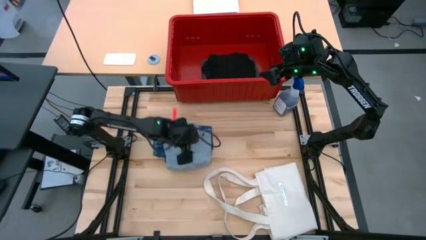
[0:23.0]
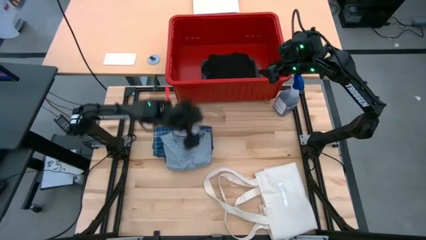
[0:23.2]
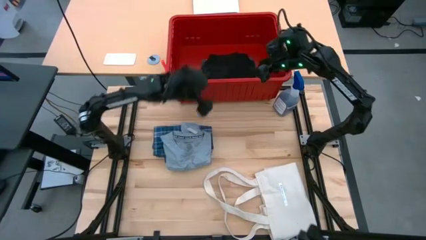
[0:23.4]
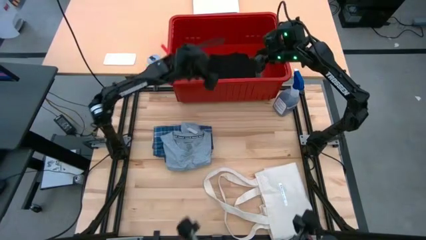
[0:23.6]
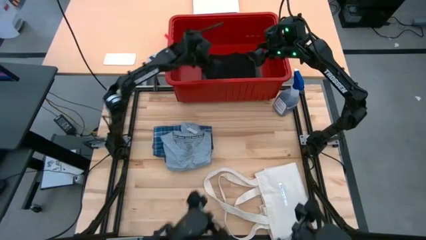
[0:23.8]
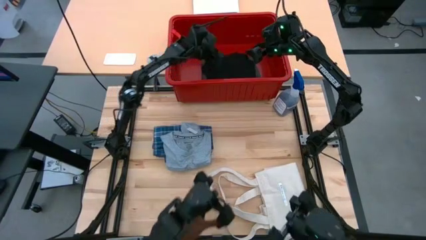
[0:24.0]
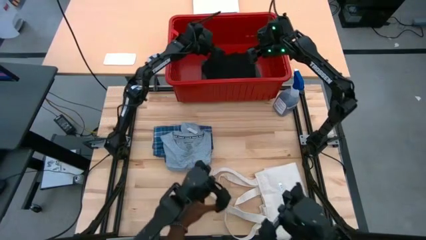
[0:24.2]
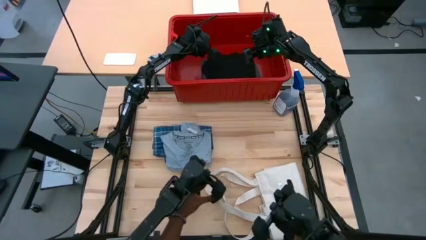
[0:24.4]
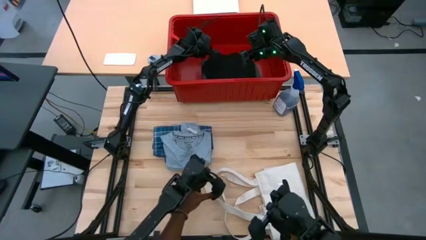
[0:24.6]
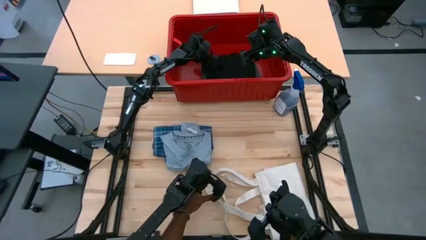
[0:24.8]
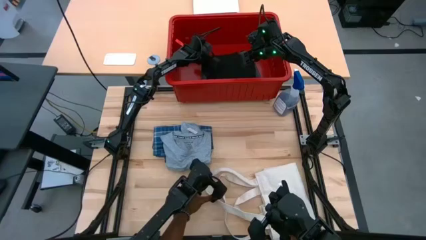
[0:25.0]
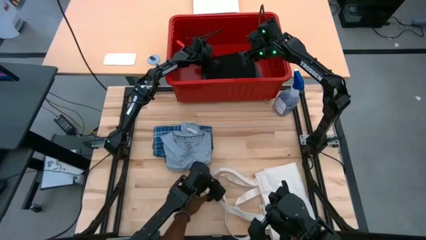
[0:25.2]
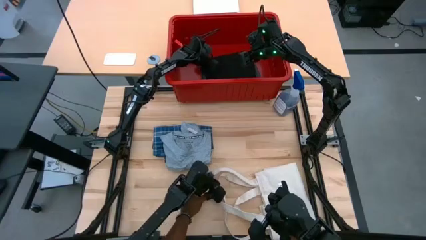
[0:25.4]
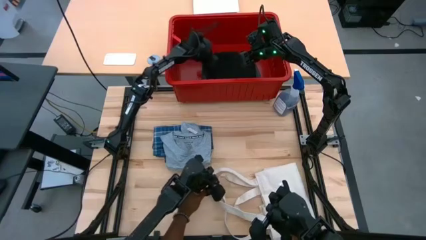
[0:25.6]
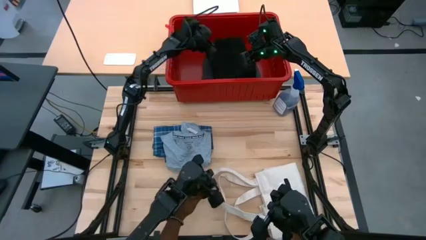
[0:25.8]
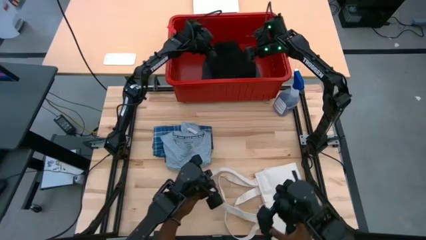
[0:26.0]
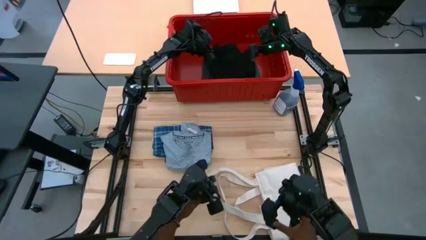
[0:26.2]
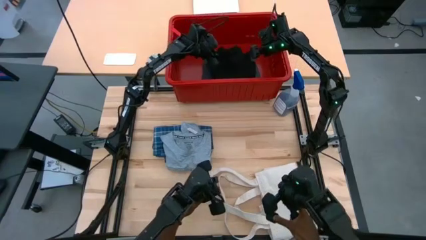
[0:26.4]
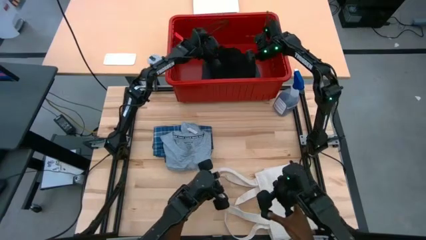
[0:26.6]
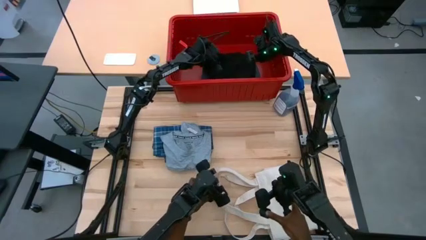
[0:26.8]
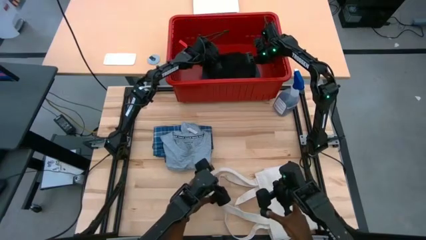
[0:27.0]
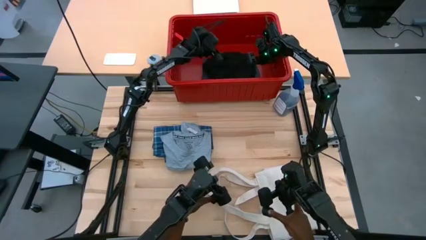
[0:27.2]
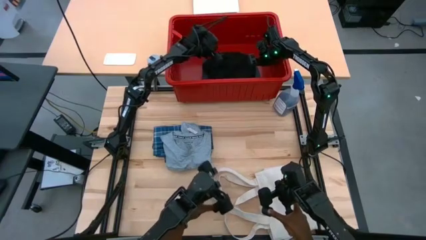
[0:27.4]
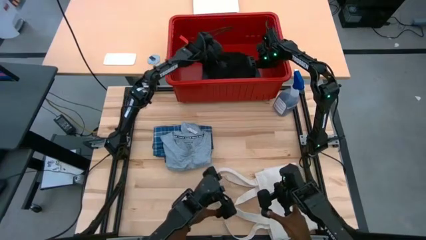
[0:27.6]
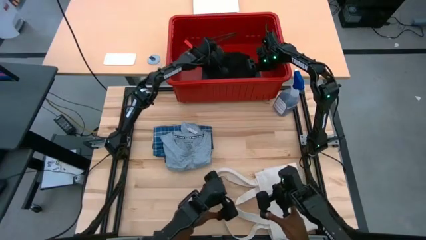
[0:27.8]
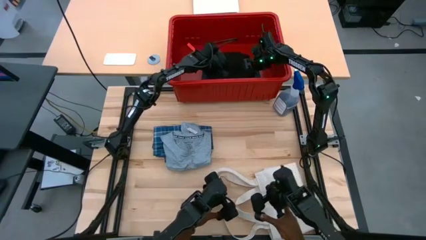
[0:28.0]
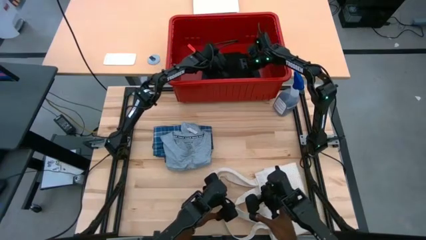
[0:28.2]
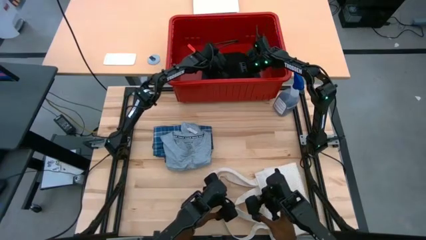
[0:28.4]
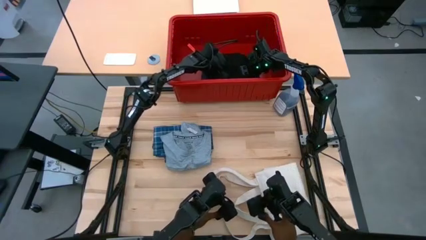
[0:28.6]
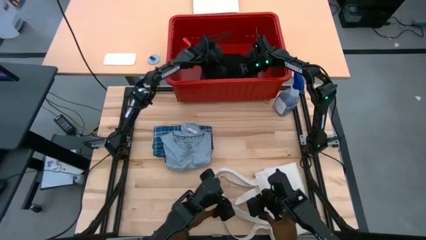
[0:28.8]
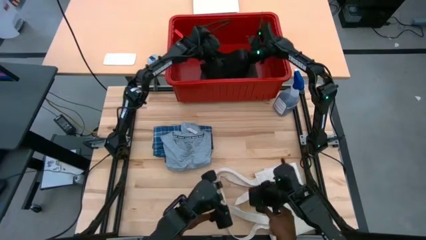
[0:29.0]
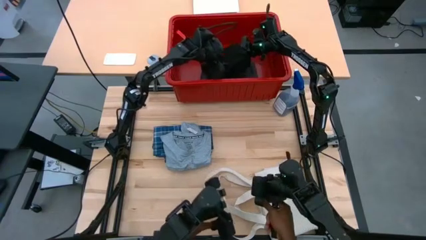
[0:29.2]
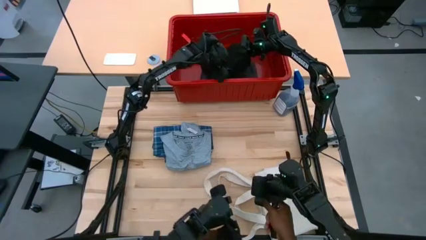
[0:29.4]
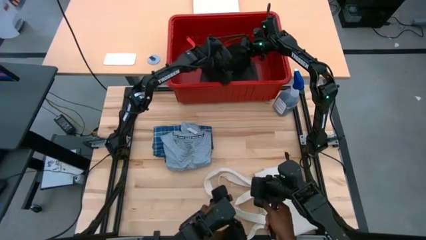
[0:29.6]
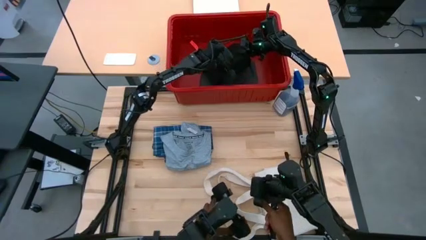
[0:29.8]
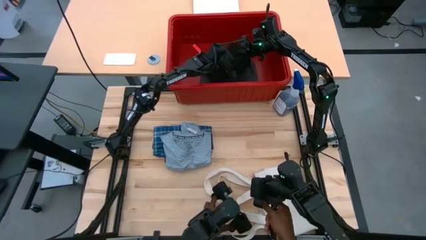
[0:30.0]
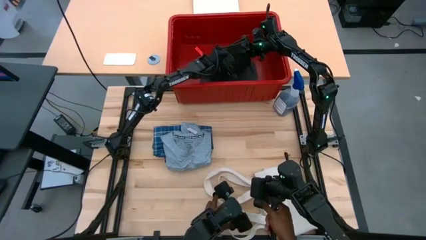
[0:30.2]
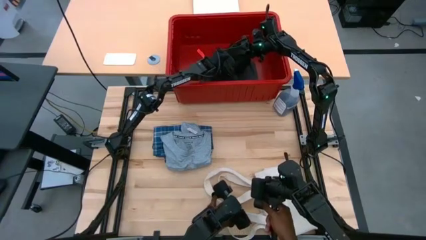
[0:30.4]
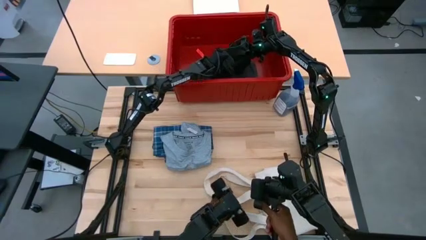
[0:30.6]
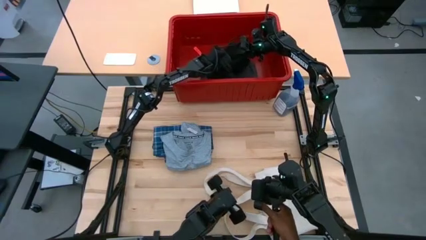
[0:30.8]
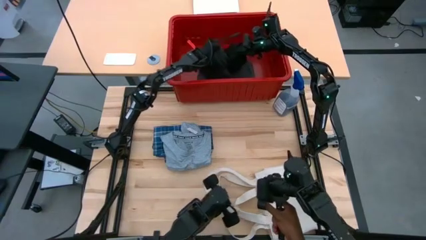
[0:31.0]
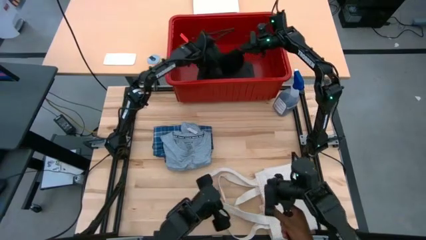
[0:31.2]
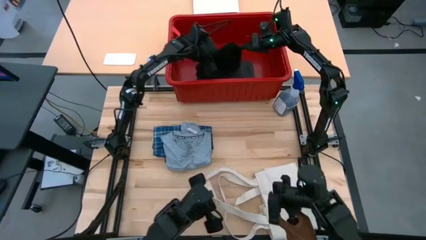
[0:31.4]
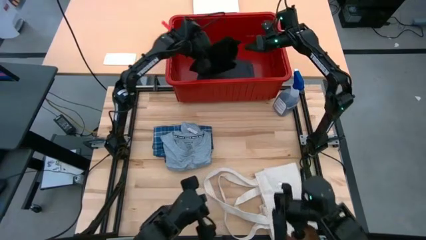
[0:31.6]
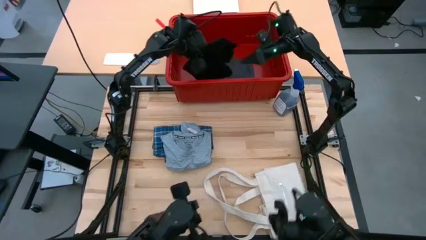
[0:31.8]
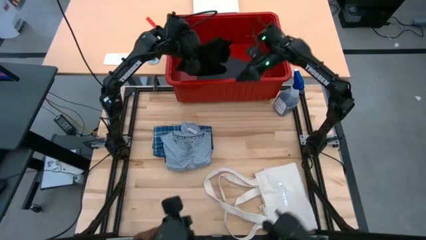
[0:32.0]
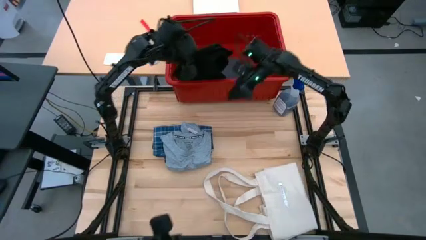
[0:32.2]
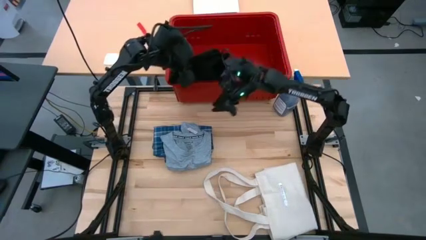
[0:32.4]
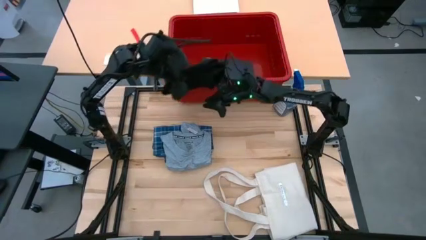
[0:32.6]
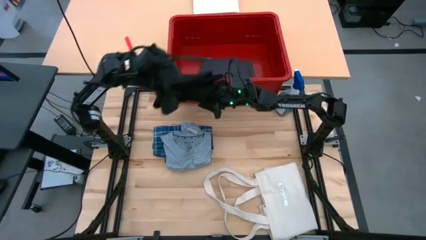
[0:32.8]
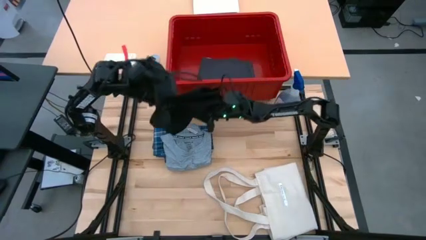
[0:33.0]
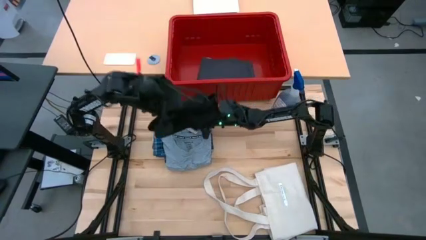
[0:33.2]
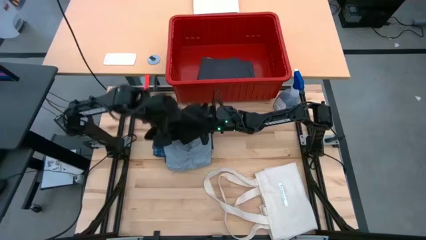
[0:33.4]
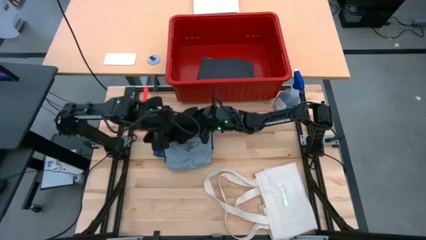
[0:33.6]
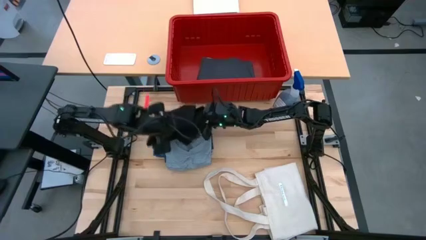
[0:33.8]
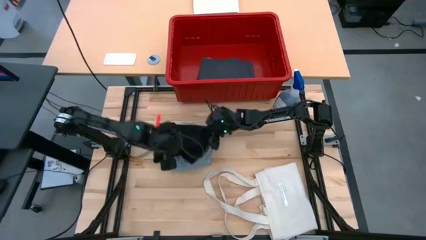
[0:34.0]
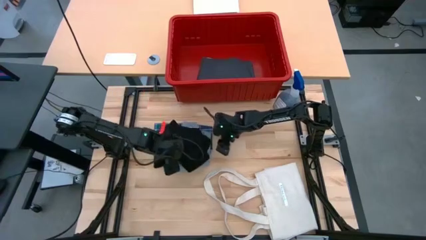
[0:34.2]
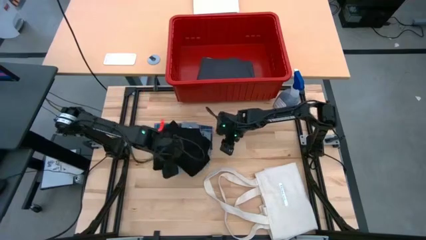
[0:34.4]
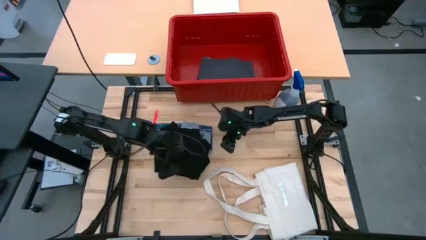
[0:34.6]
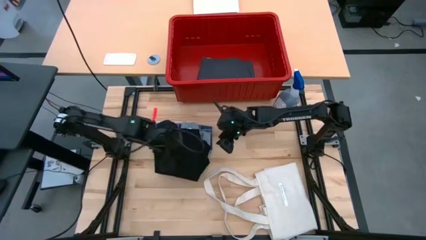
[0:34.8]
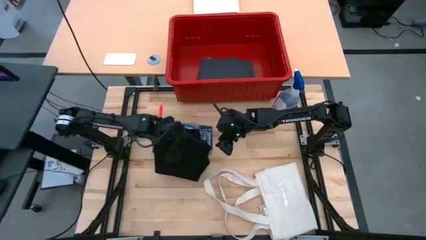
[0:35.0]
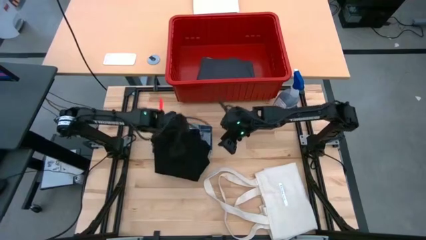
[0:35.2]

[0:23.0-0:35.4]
Task: Fold laundry
Remove the black shirt from the red organizer bin

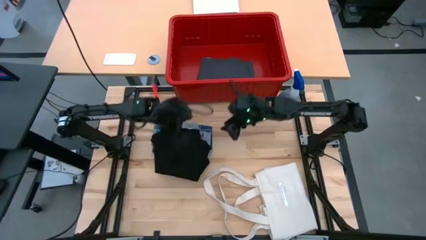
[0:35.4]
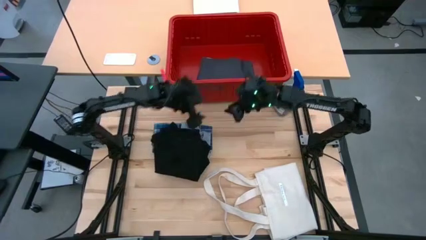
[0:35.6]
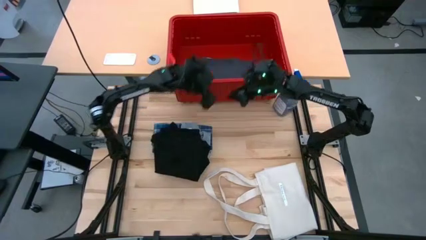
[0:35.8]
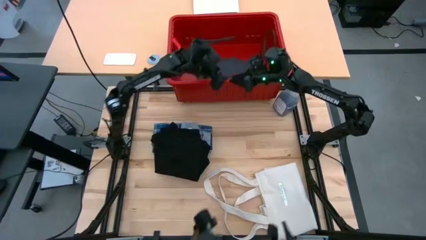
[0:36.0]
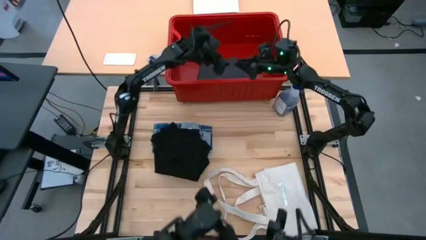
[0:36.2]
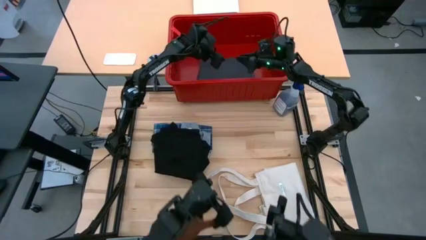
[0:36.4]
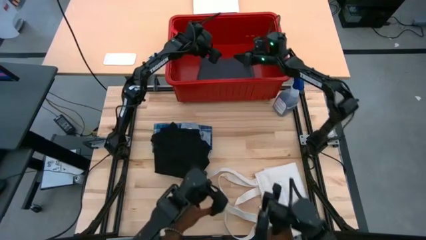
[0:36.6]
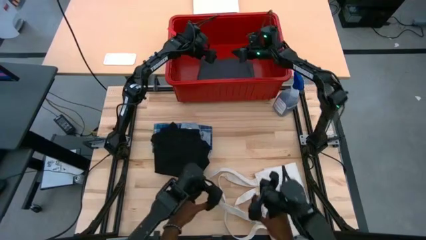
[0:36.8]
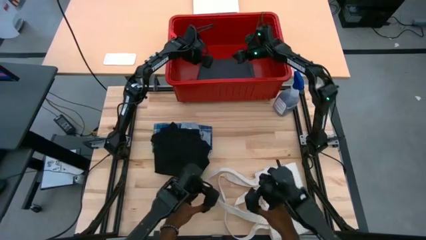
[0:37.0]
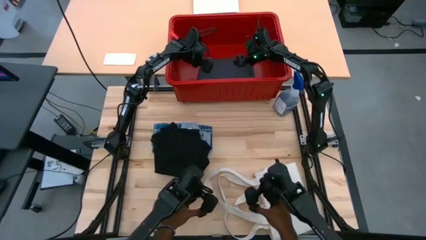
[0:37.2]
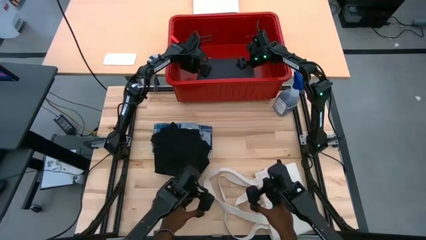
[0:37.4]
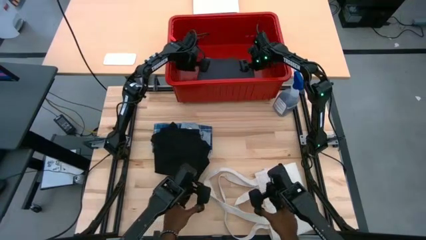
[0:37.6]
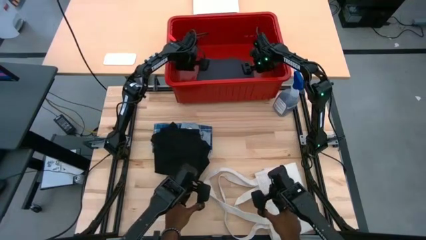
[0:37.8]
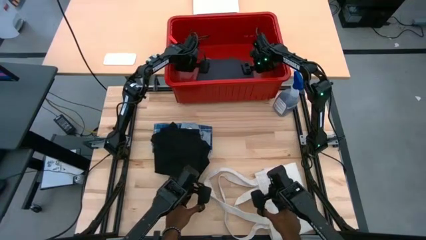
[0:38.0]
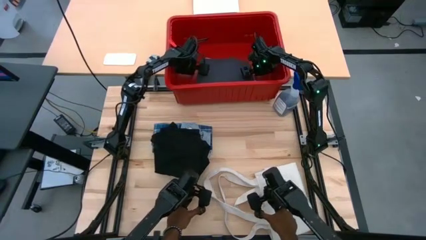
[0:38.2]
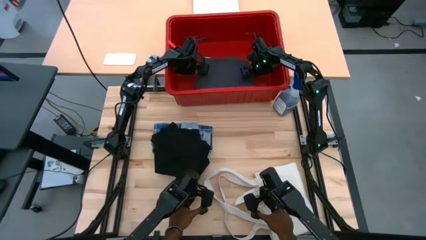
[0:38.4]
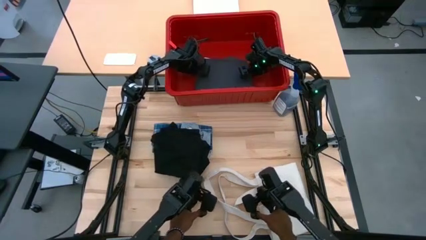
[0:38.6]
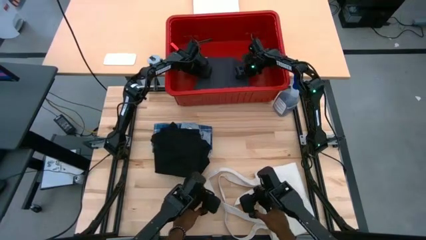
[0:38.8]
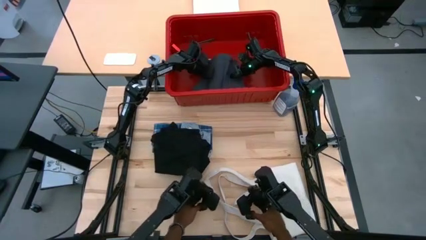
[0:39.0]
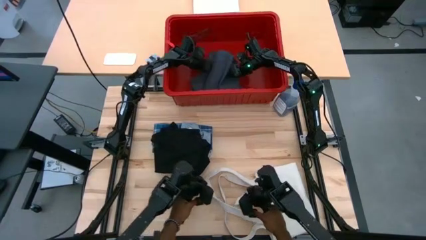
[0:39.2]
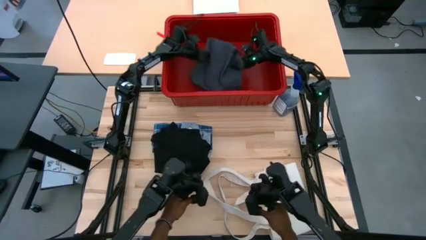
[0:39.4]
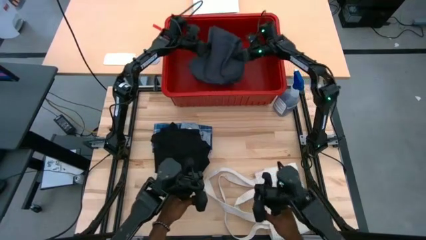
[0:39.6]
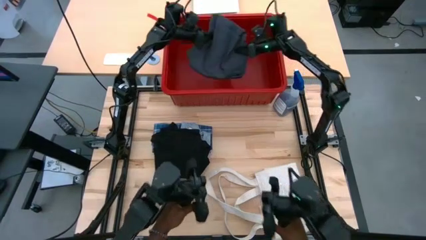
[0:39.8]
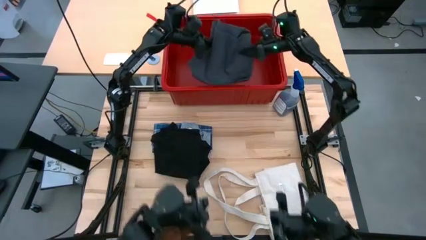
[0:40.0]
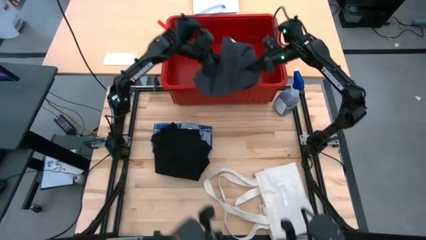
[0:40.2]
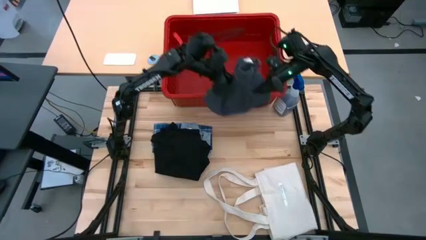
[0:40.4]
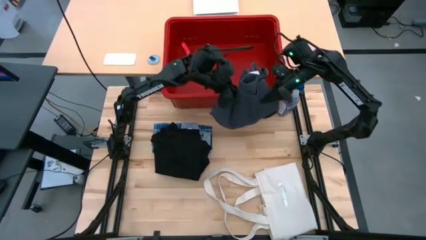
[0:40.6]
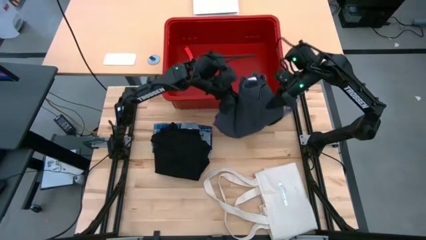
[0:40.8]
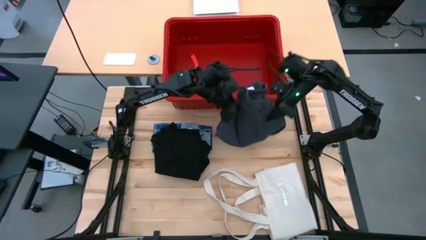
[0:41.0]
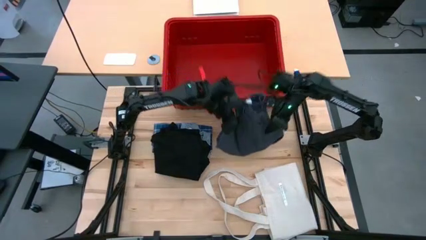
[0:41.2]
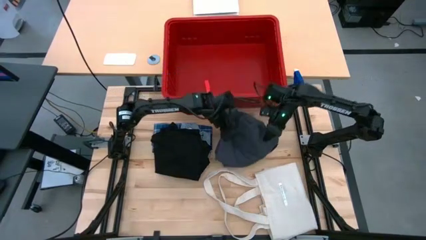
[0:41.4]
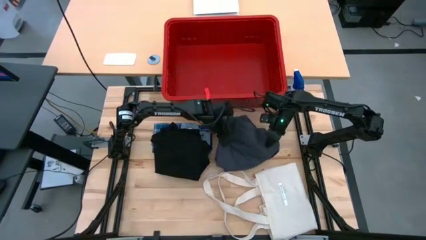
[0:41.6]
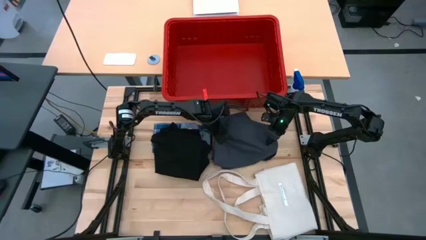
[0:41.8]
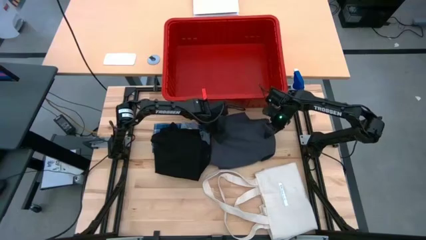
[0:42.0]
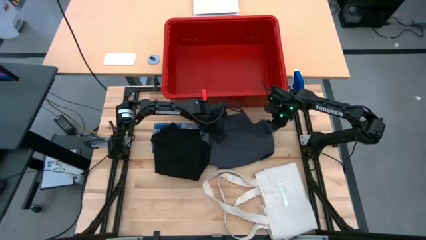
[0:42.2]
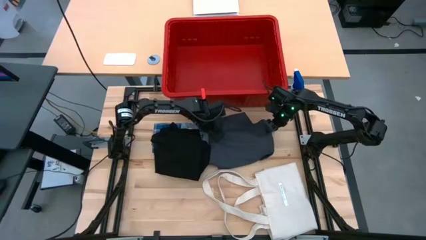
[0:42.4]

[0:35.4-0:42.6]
Remove the dark blue shirt from the red organizer bin
